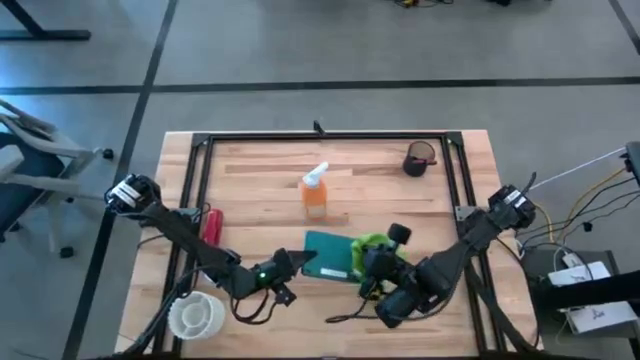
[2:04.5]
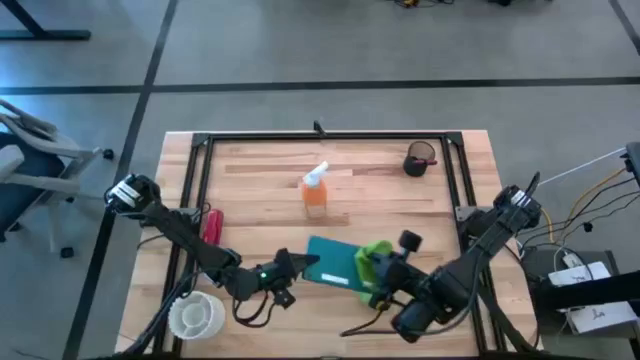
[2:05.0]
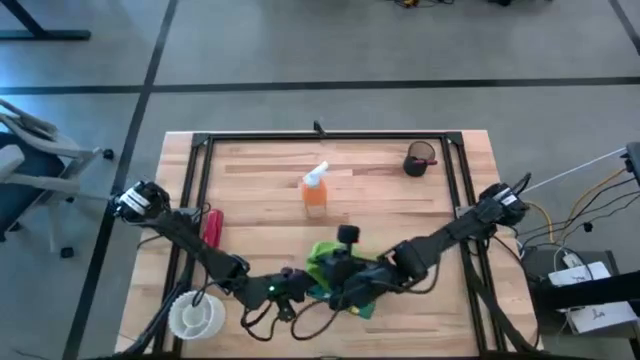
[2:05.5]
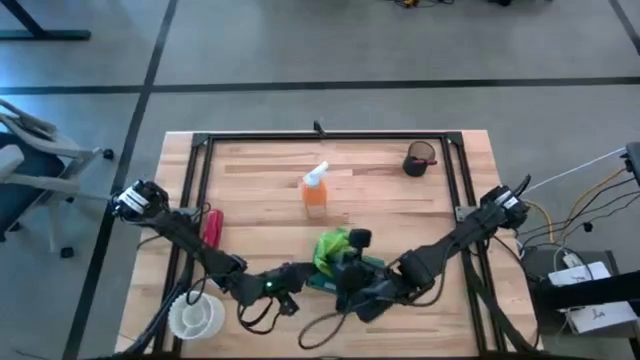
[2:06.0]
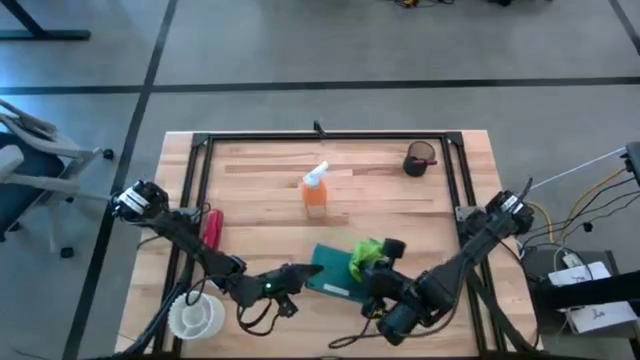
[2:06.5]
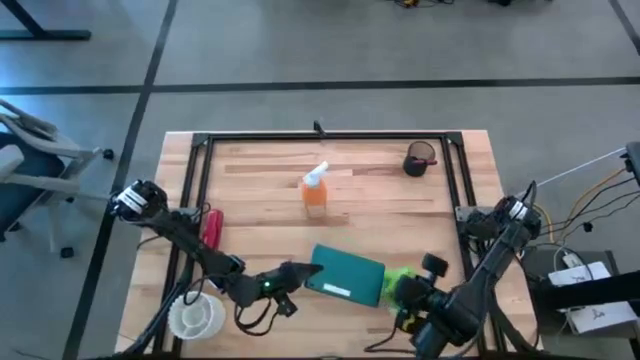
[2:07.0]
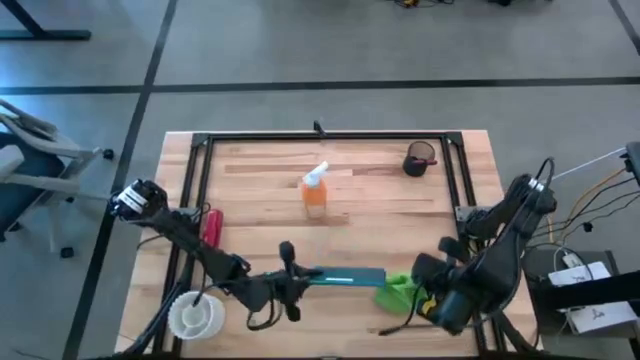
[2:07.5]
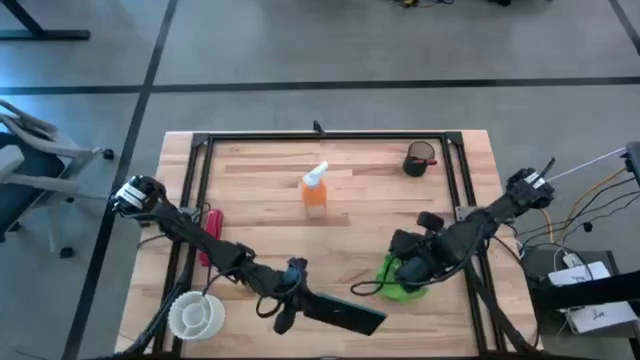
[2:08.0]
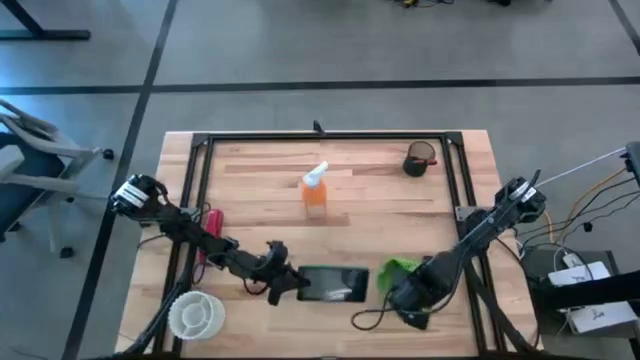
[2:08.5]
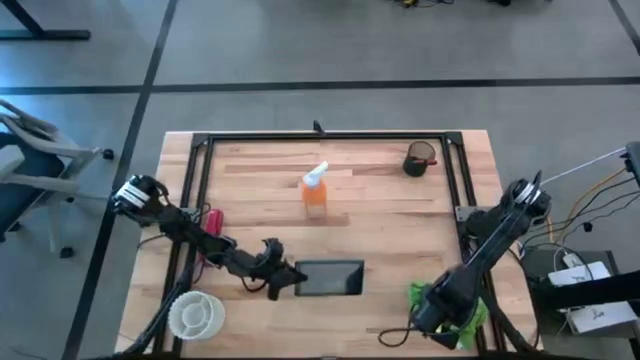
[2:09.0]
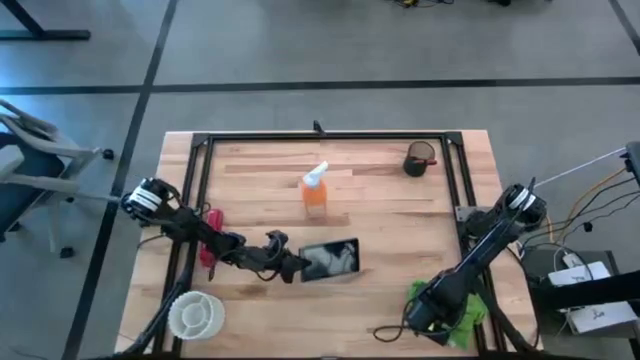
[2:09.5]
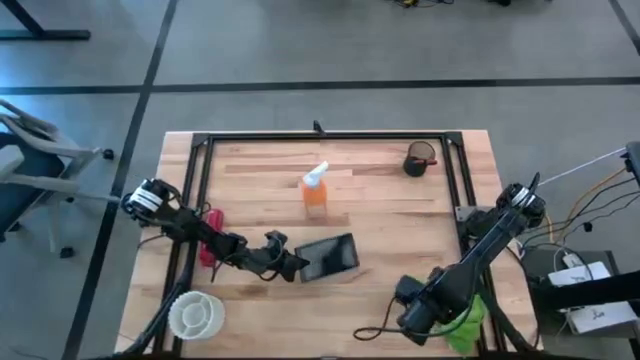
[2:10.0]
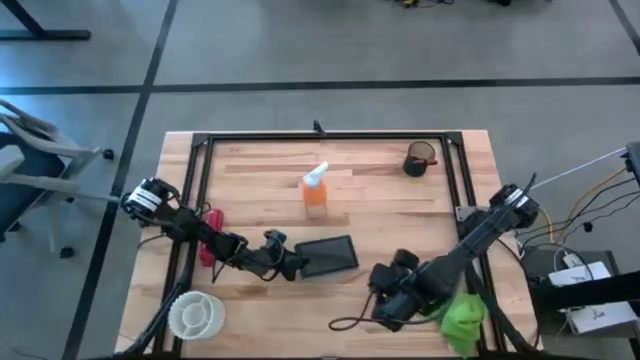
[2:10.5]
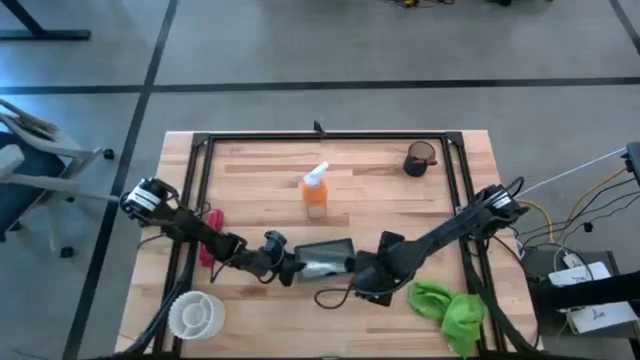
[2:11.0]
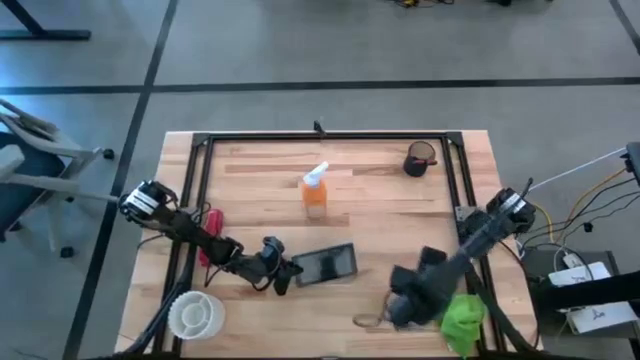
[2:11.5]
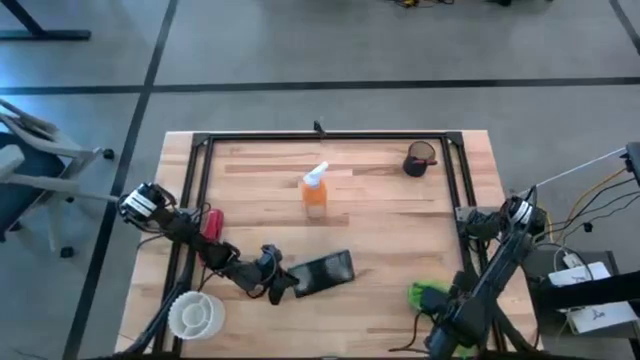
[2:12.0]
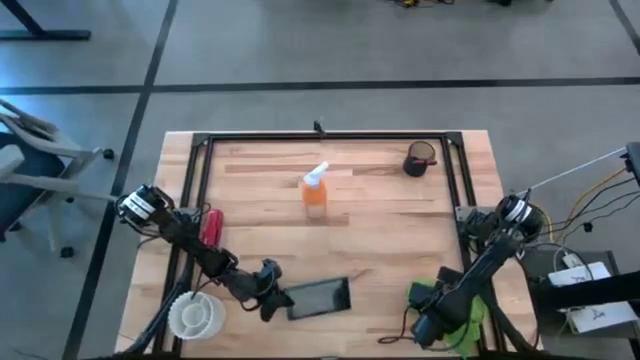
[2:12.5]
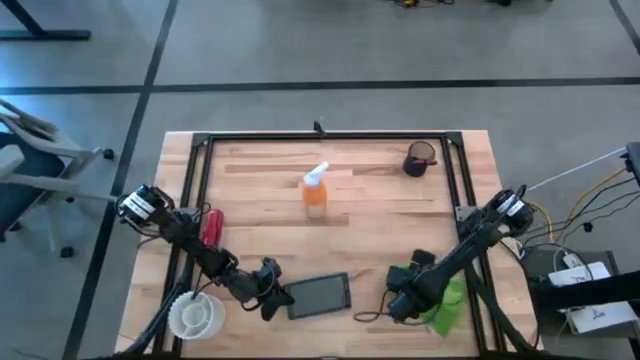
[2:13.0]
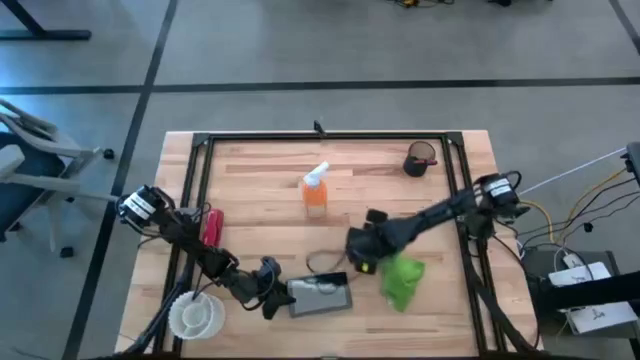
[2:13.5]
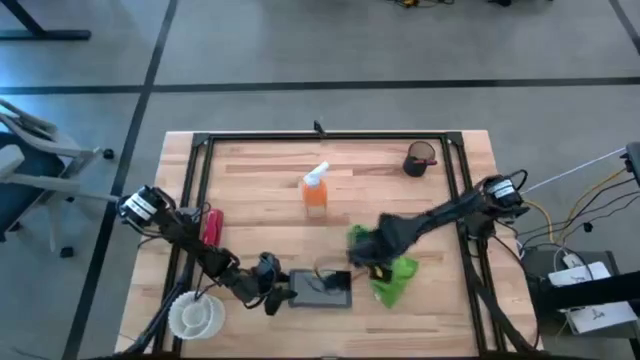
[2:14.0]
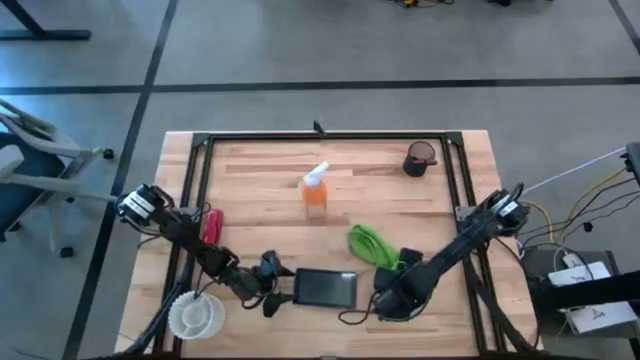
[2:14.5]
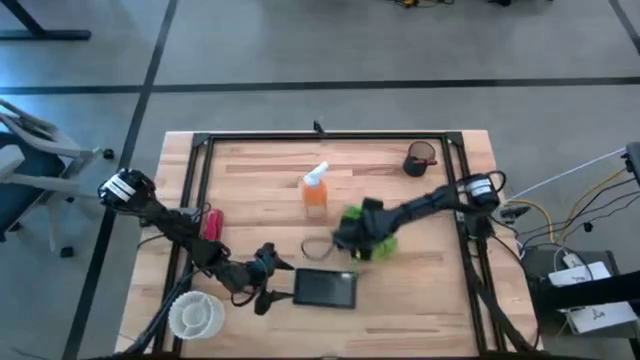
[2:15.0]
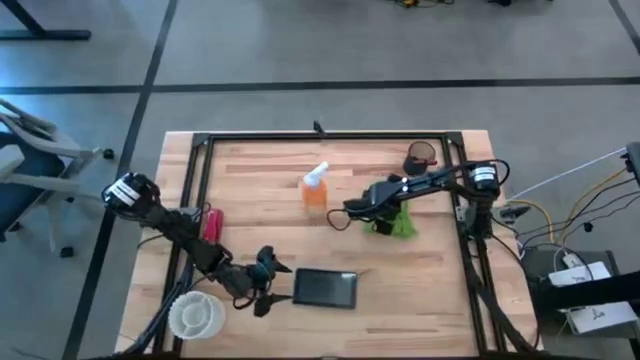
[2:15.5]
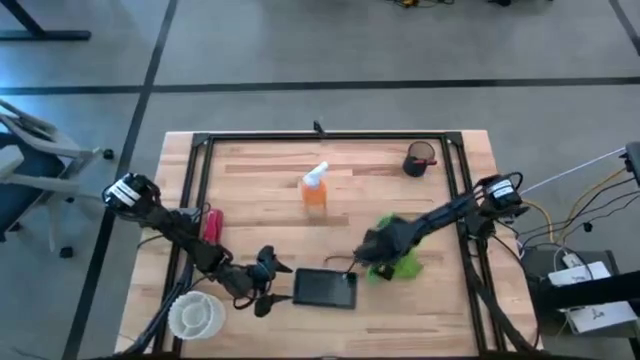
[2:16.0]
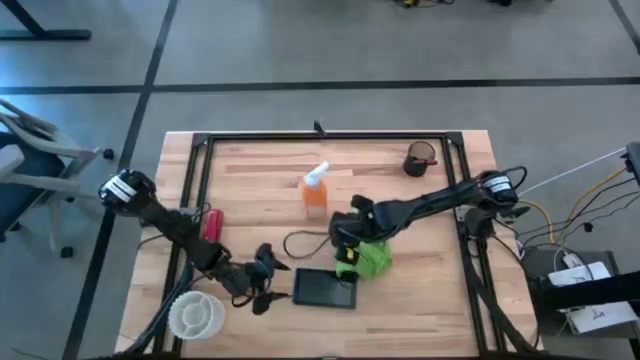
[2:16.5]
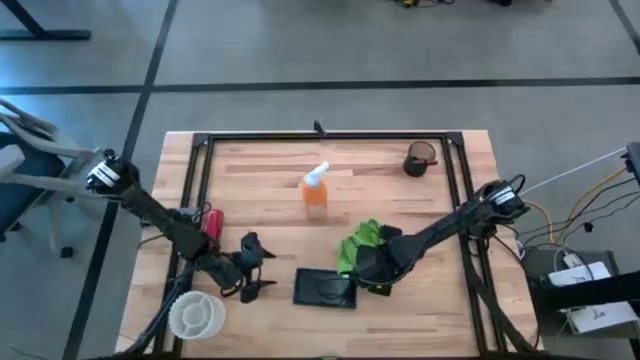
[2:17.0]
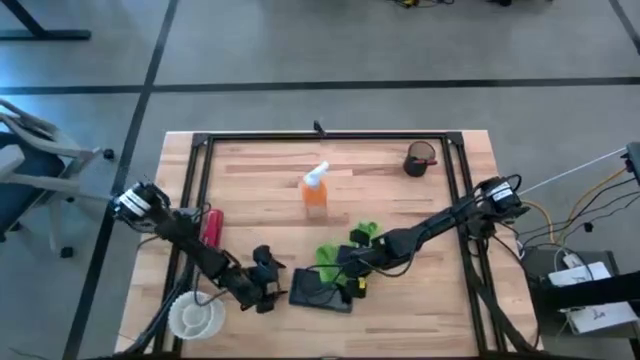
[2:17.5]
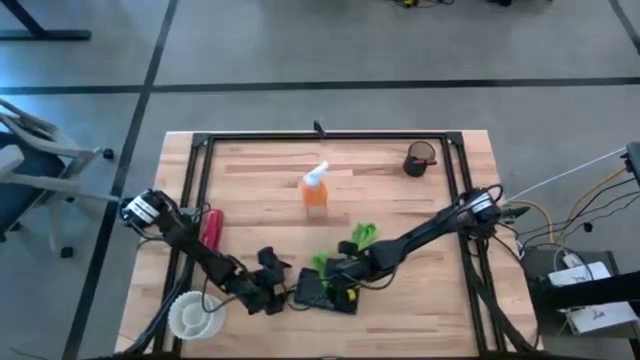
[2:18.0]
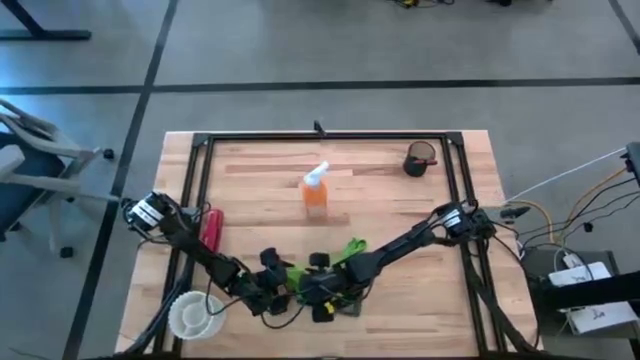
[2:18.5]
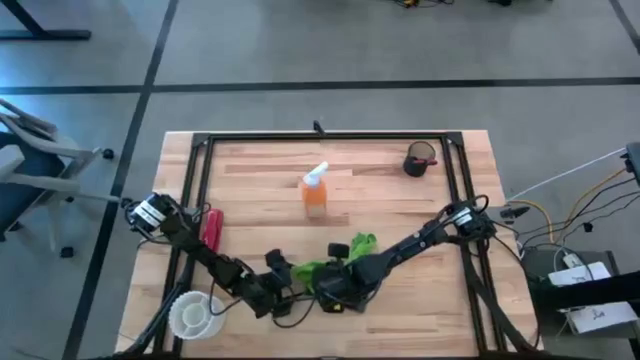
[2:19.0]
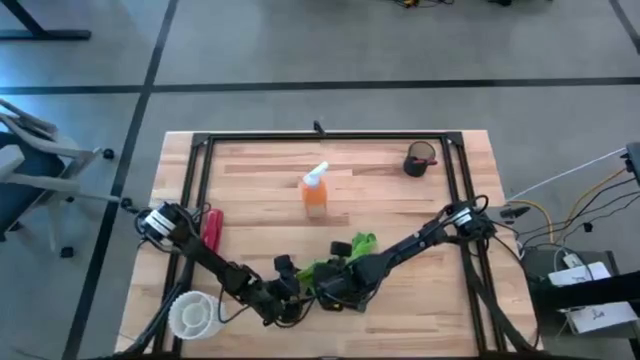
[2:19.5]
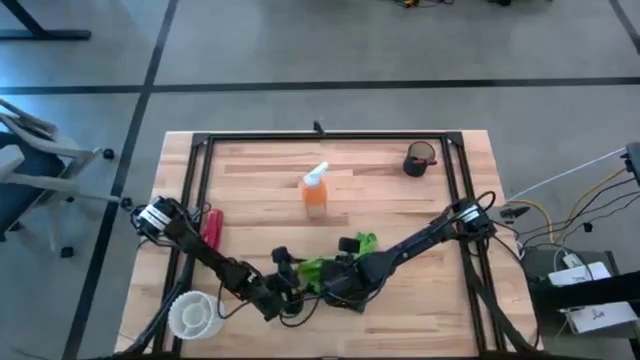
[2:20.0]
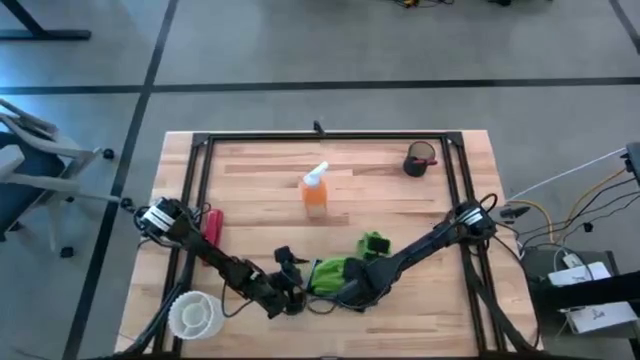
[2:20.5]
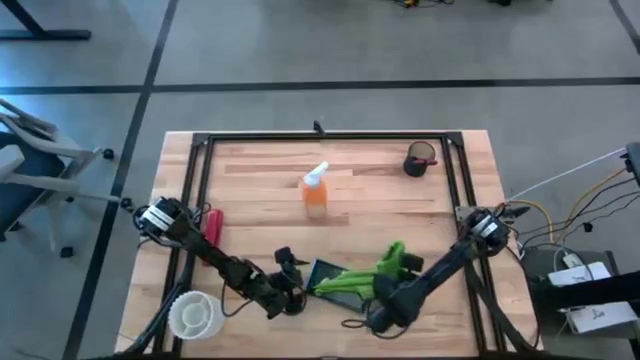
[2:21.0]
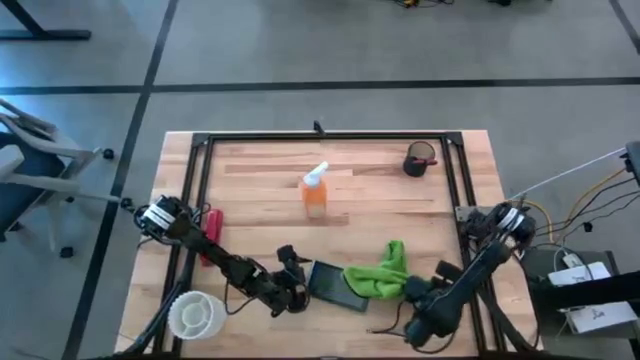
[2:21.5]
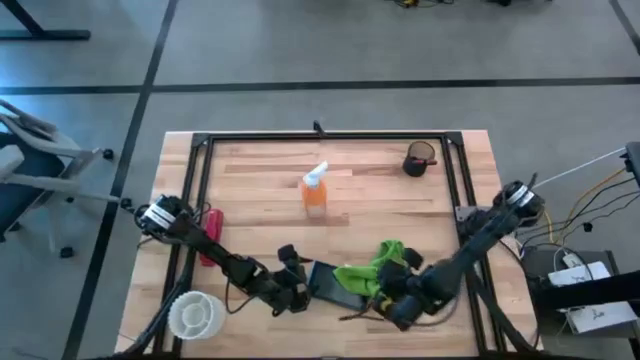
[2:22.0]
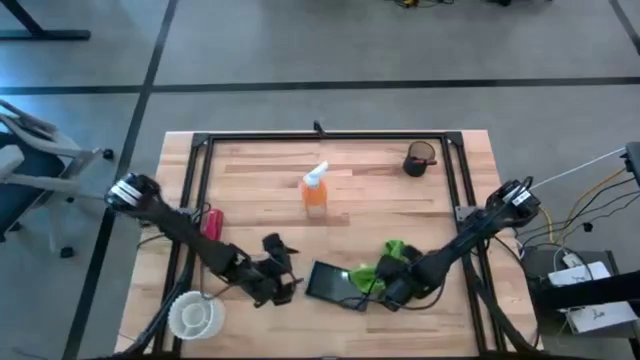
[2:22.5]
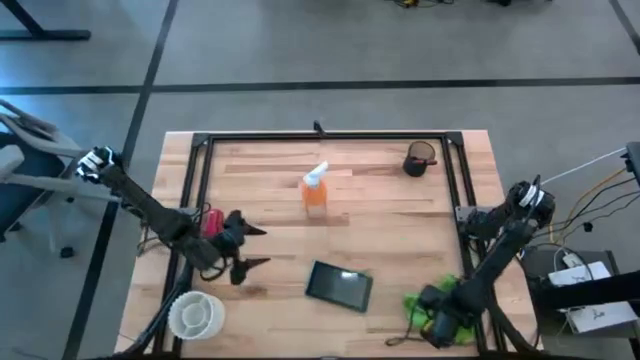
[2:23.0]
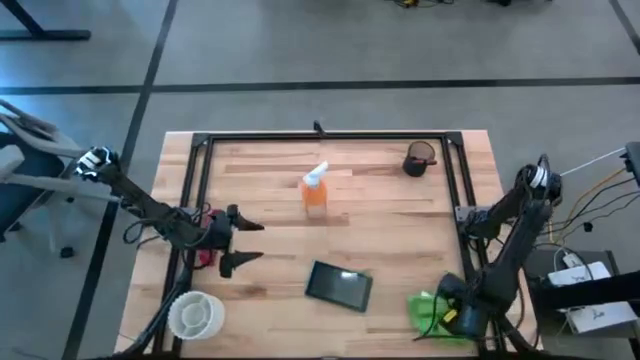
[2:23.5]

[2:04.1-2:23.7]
Task: Apply microfiber cloth
Wipe the front and back of the blue cellphone with the green microfiber cloth

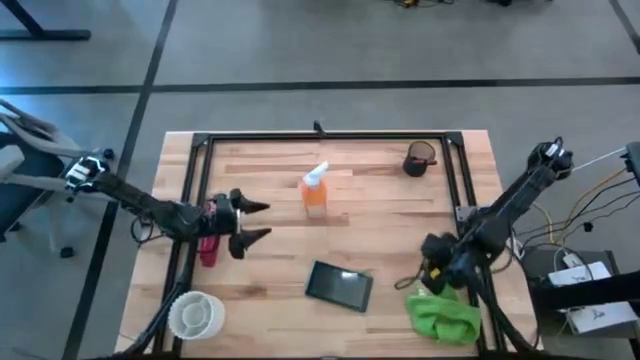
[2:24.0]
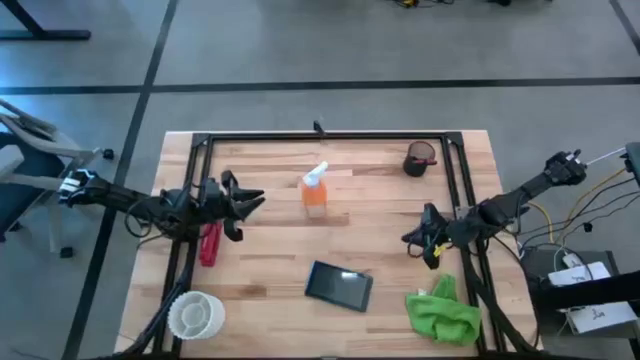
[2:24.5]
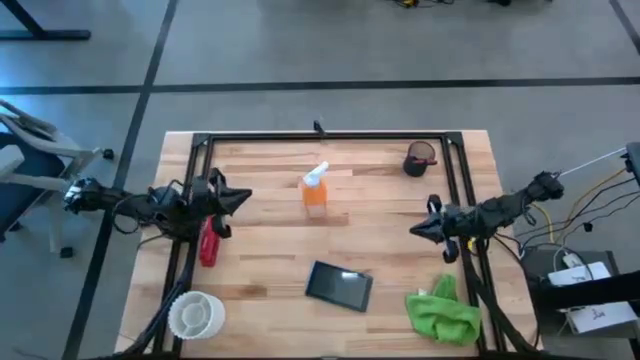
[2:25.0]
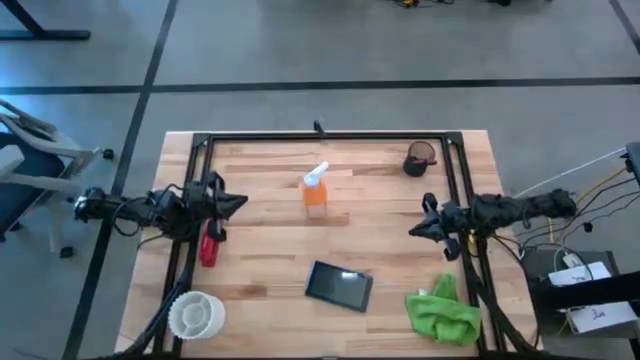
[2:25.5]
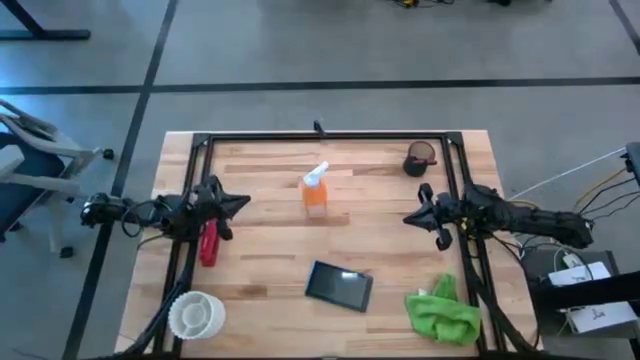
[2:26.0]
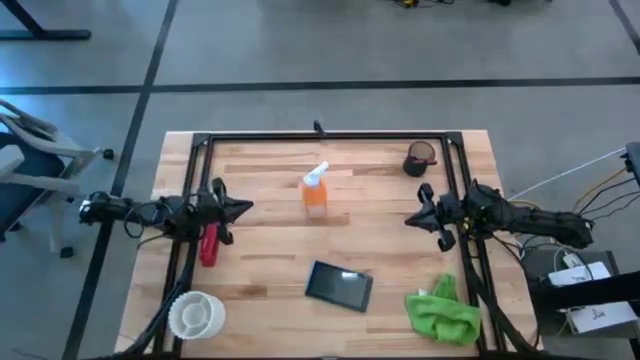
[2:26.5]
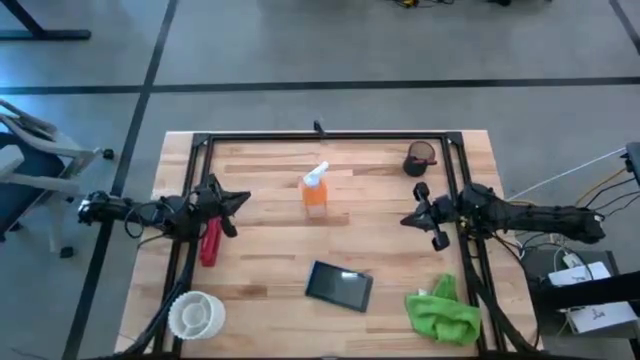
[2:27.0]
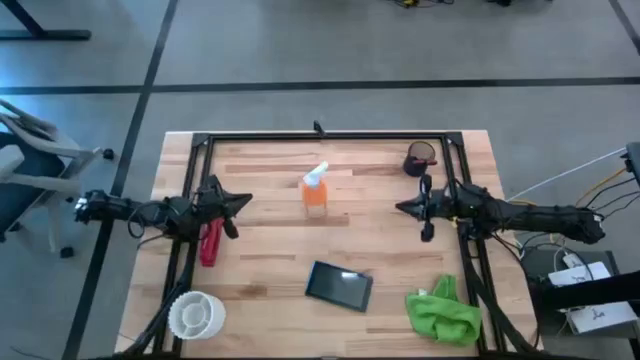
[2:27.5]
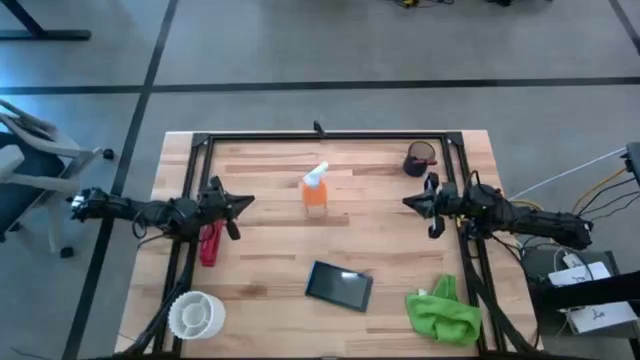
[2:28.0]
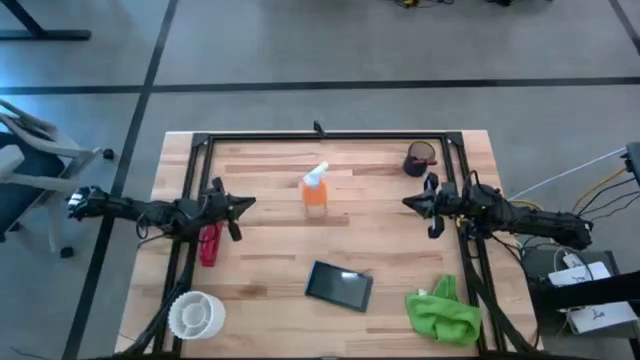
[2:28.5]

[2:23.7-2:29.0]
Return to Home Position
